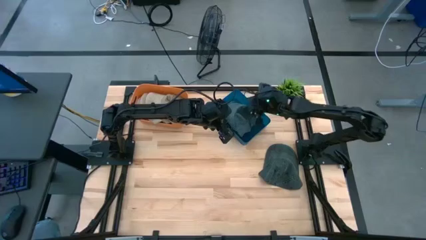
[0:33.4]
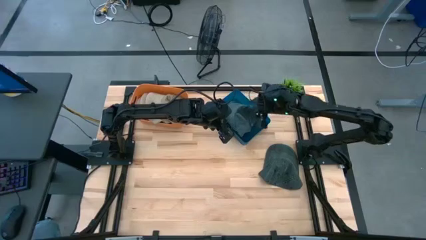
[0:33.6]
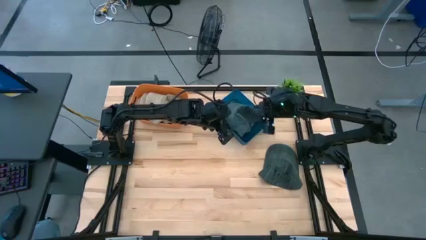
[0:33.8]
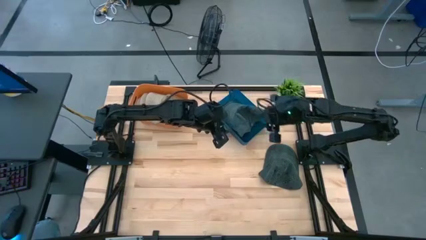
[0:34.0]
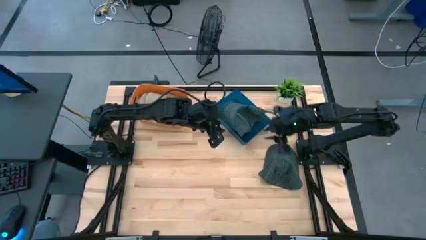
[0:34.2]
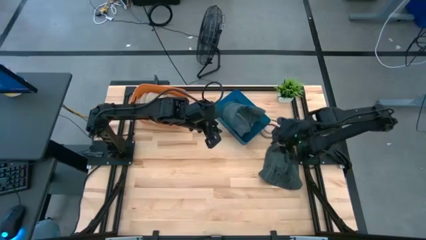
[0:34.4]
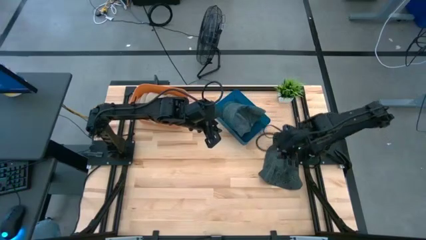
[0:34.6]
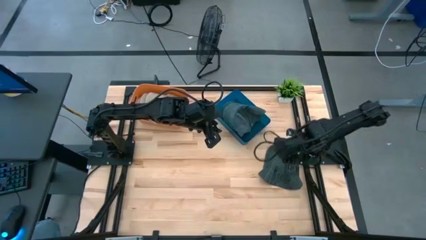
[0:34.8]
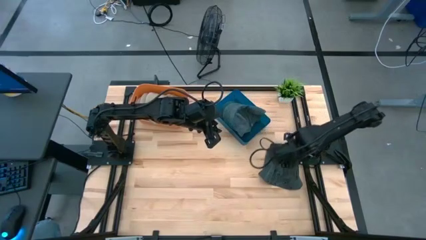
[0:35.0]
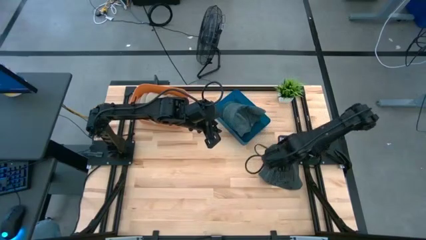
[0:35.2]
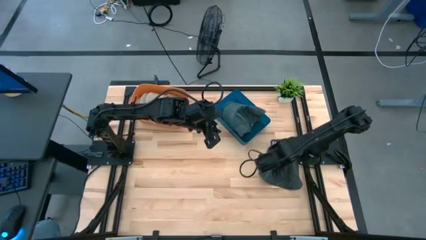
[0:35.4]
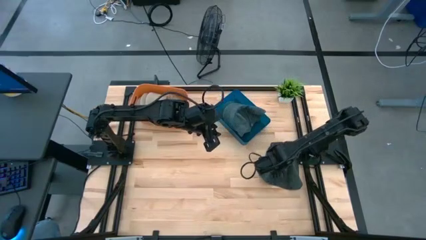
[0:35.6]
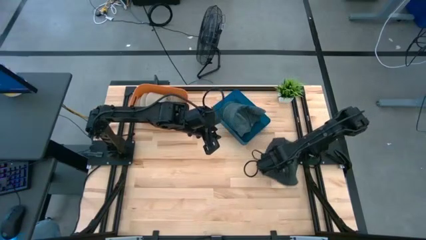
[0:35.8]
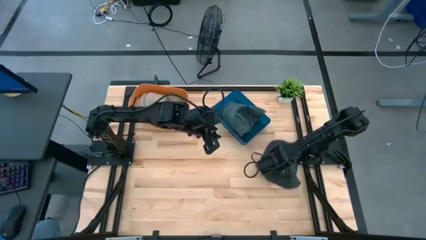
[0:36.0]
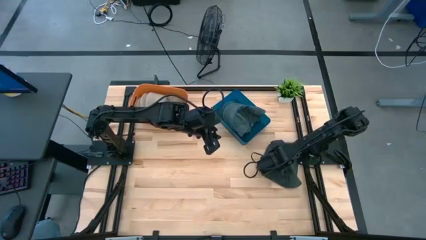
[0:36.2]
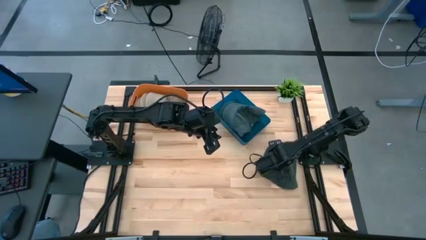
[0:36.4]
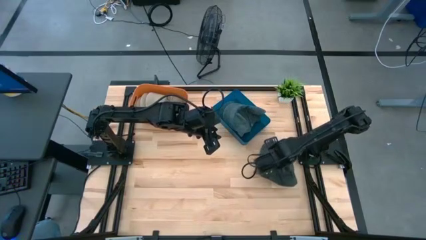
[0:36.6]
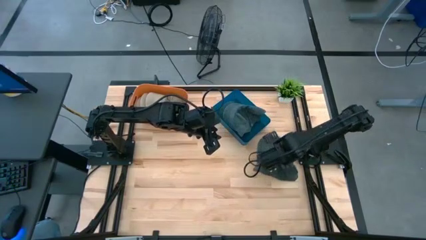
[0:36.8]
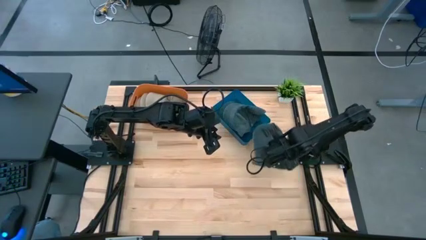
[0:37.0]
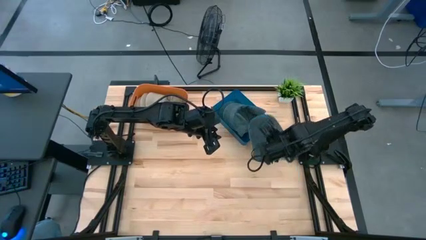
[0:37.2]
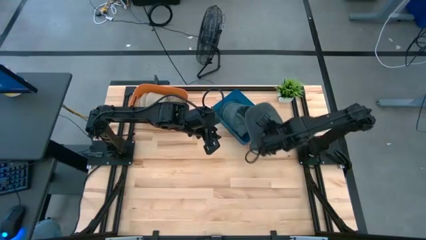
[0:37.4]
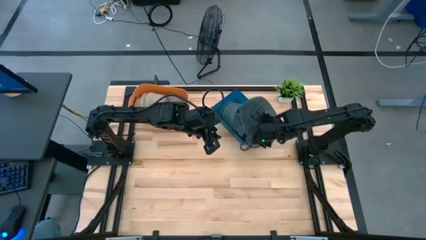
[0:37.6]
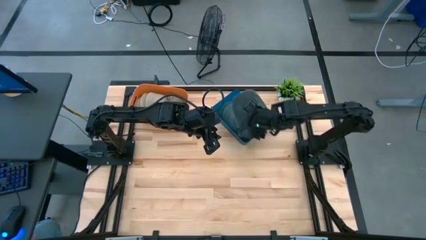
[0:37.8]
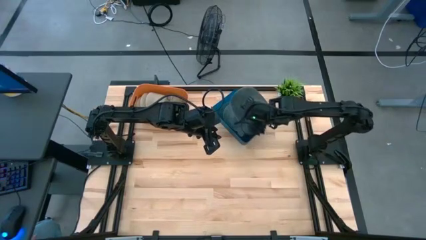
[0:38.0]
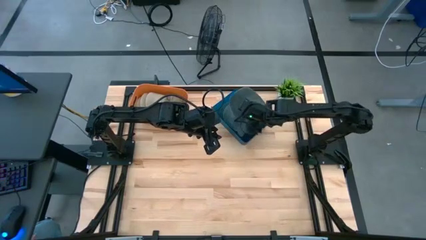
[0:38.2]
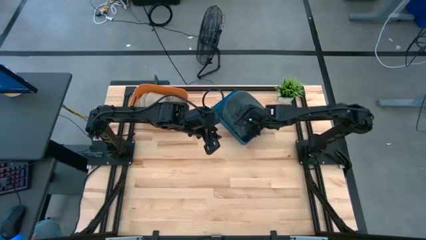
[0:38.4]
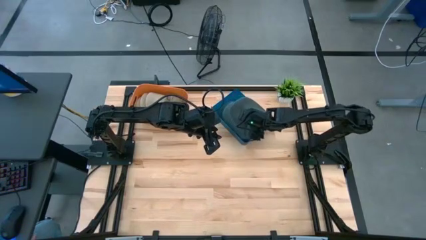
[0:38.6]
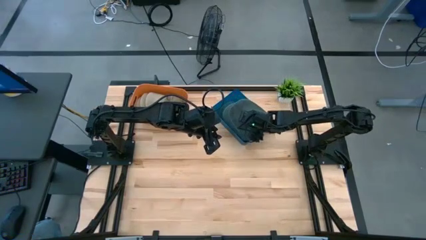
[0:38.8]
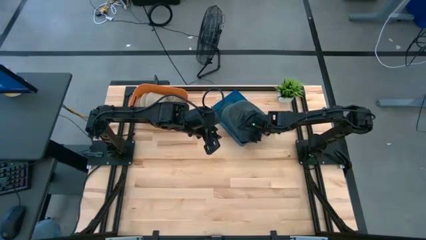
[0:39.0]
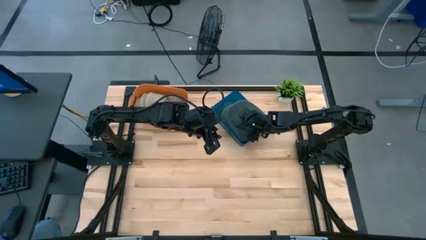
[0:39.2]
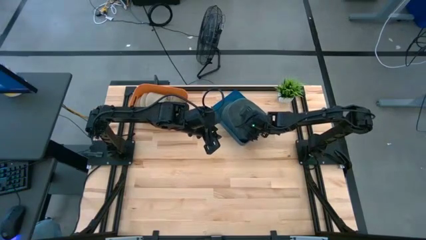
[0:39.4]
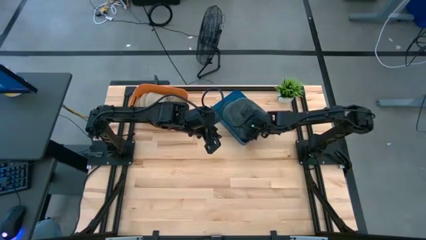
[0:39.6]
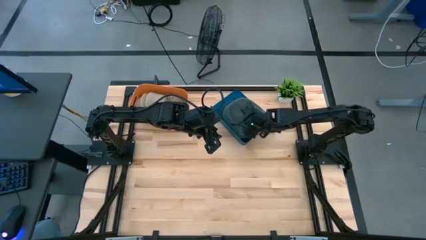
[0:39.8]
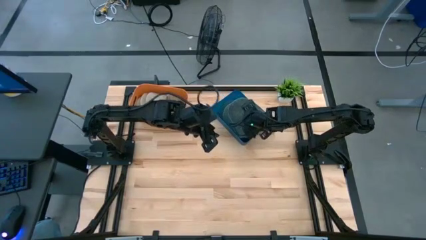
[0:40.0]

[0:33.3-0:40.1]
Task: Pick & Place hat
Put the gray cap into the blue bin

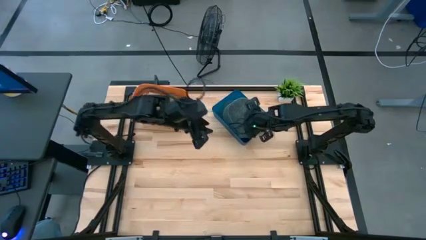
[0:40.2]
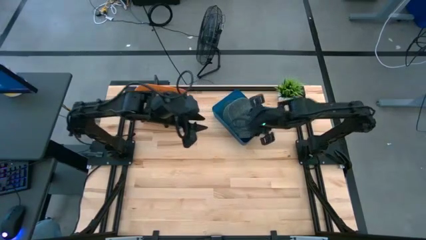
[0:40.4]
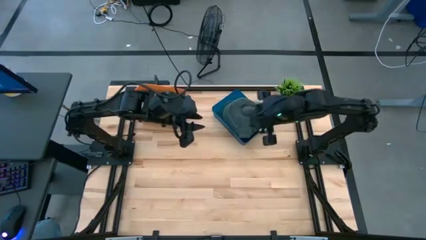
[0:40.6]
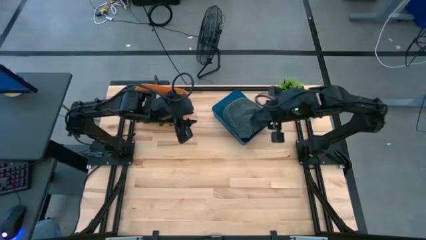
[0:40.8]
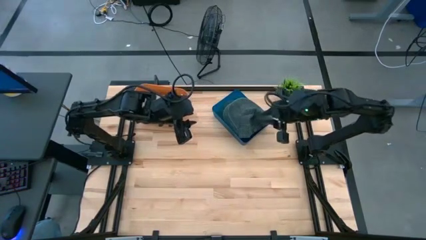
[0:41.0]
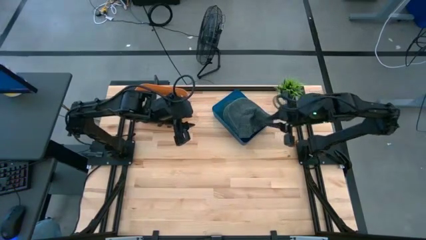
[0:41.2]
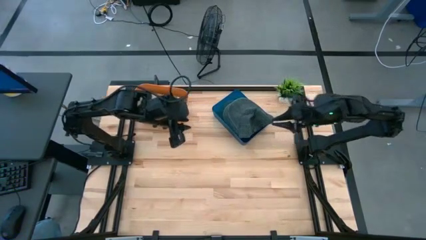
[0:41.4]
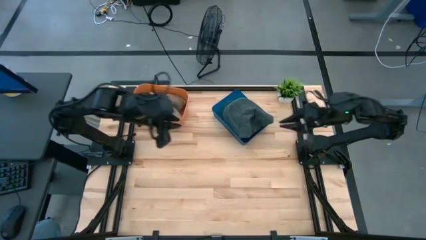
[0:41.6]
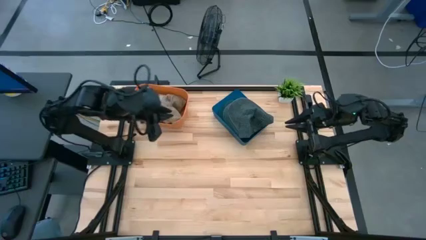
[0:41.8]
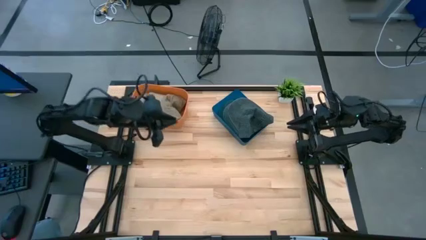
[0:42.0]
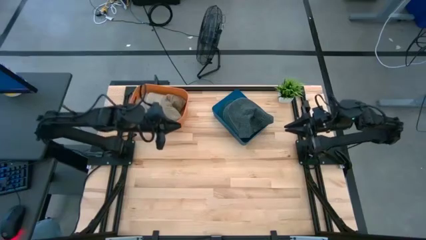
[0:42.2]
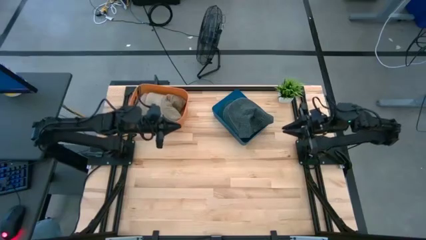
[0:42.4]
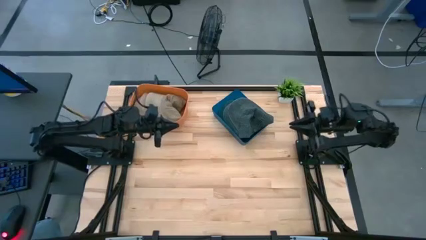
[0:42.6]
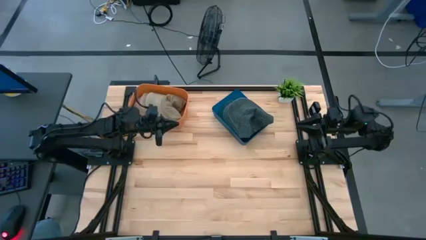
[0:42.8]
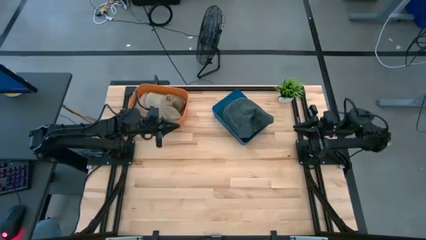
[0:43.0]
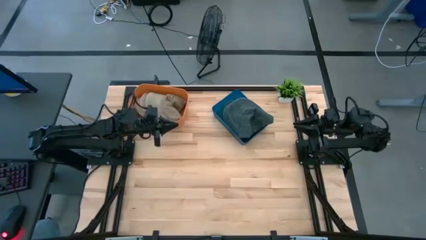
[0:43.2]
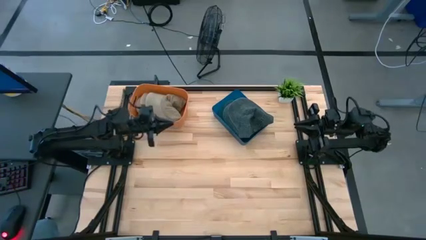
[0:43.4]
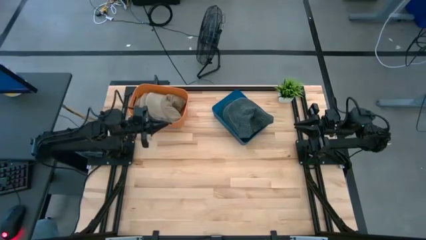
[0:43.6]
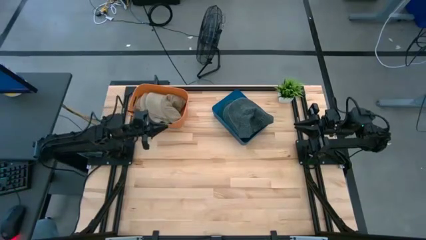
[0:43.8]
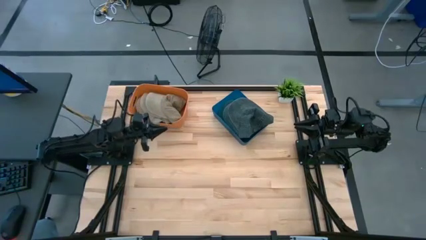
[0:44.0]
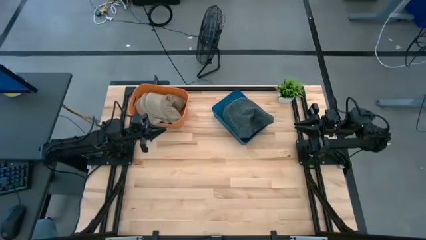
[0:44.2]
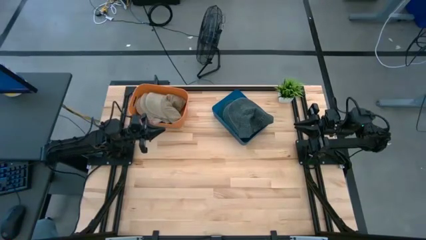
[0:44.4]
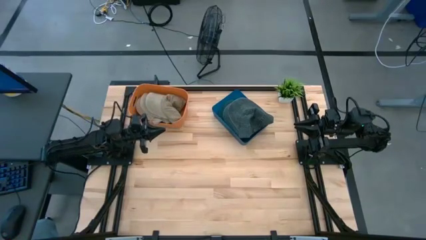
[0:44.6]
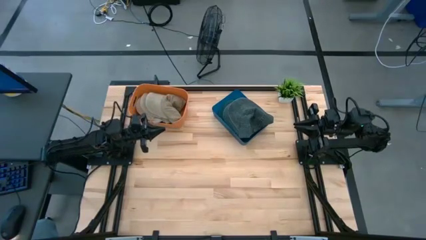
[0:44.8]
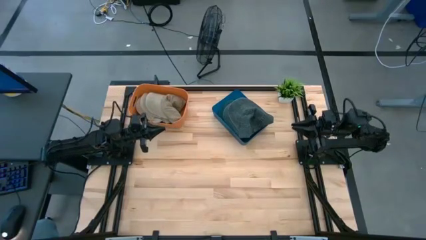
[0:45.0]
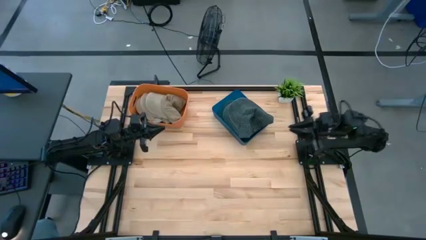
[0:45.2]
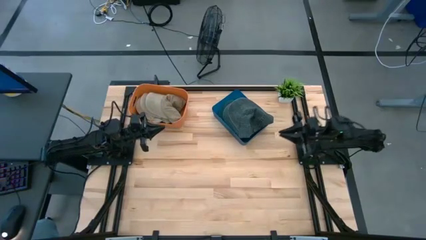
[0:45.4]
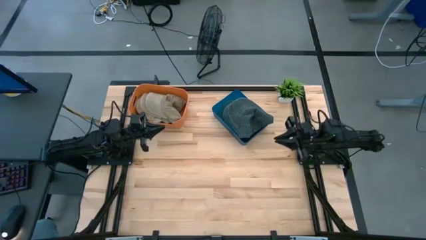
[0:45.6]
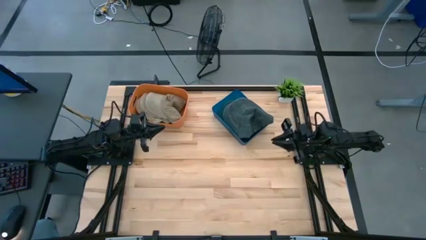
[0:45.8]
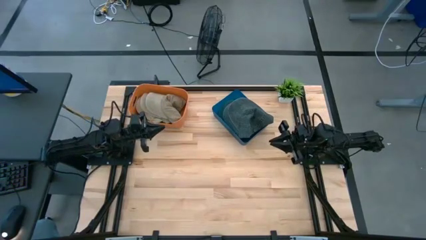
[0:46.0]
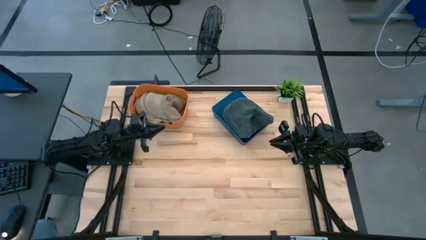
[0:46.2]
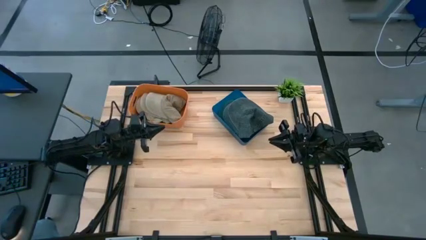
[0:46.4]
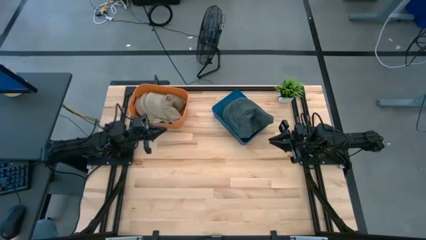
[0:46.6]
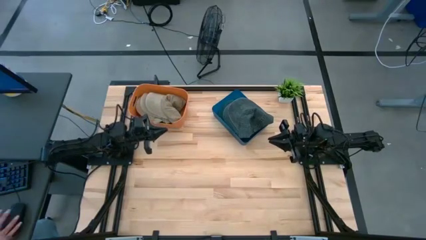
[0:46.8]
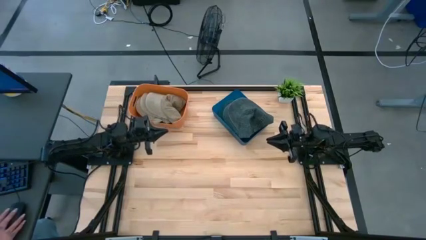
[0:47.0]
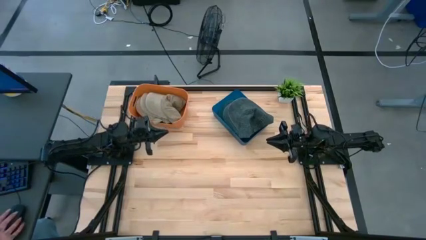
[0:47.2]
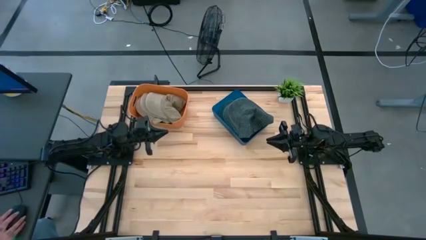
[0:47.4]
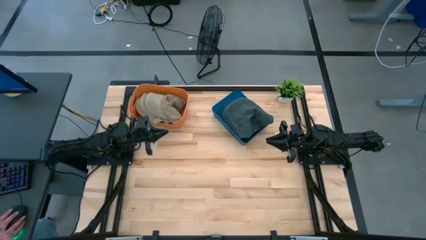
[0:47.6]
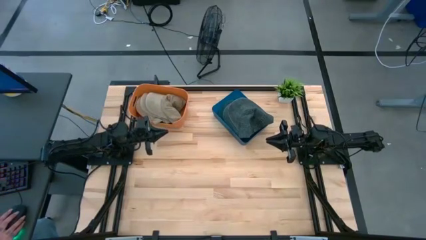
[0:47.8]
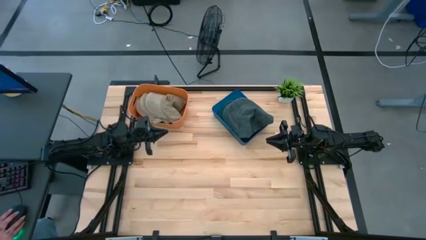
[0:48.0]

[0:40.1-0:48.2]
Return to Home Position
